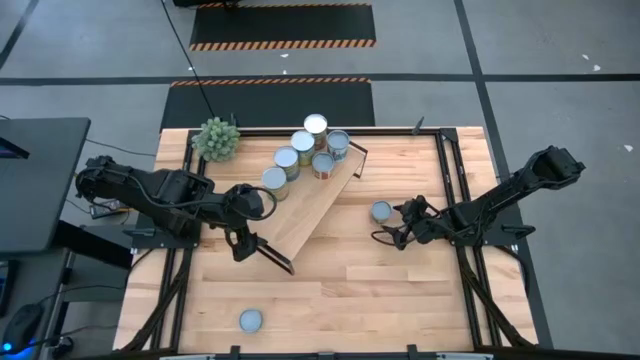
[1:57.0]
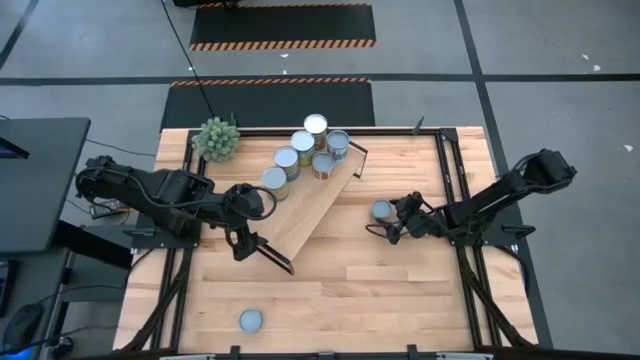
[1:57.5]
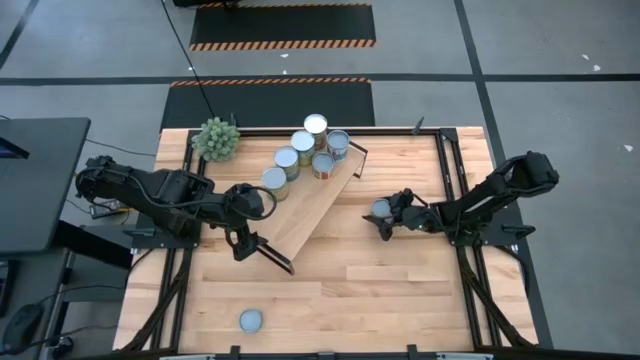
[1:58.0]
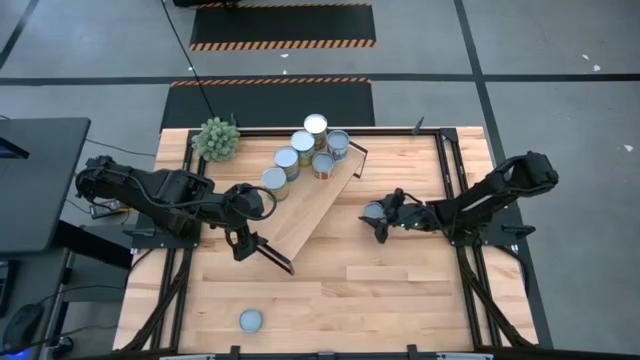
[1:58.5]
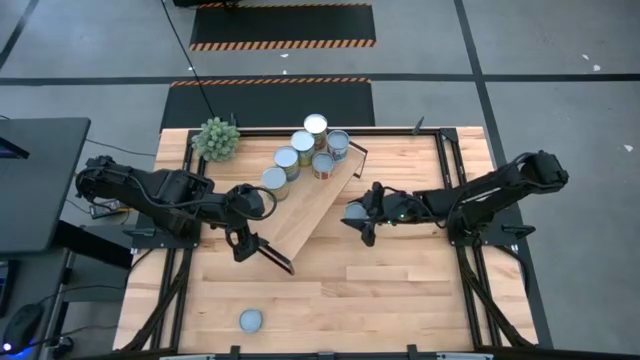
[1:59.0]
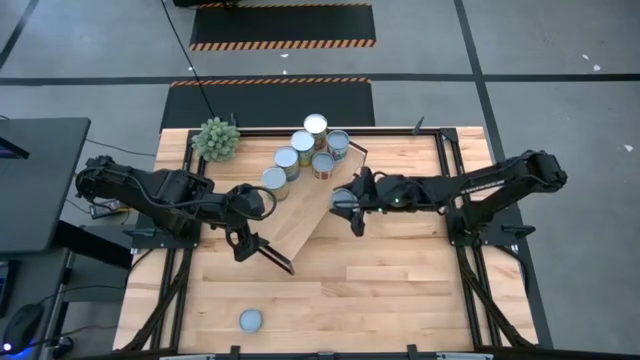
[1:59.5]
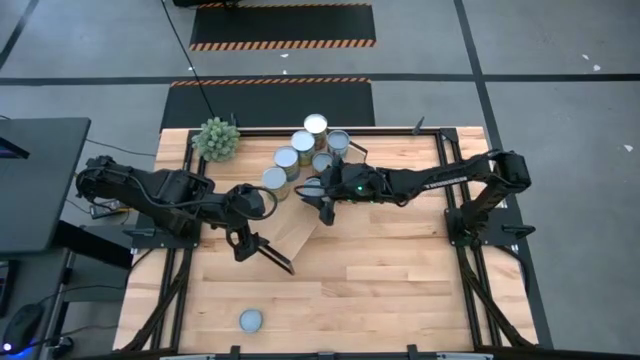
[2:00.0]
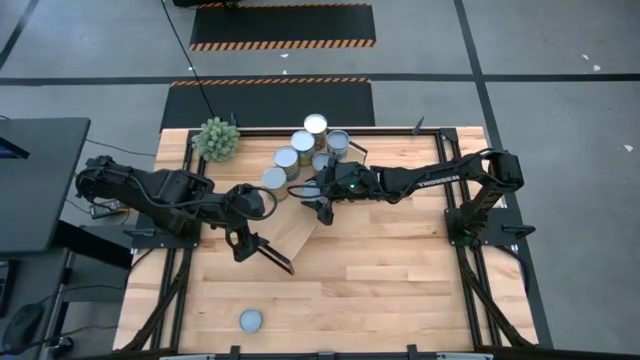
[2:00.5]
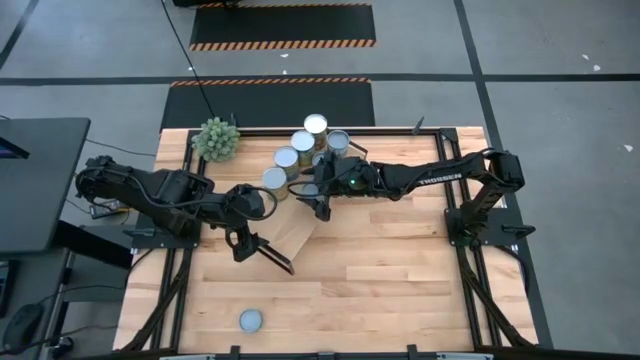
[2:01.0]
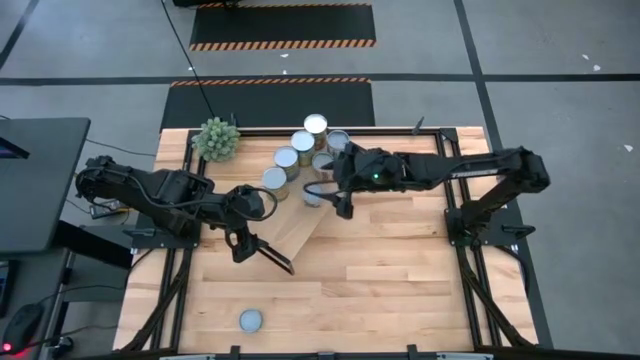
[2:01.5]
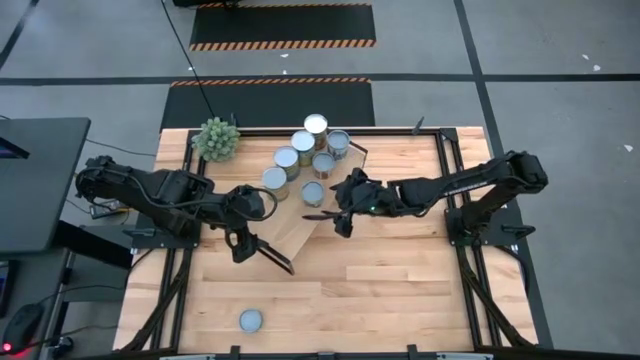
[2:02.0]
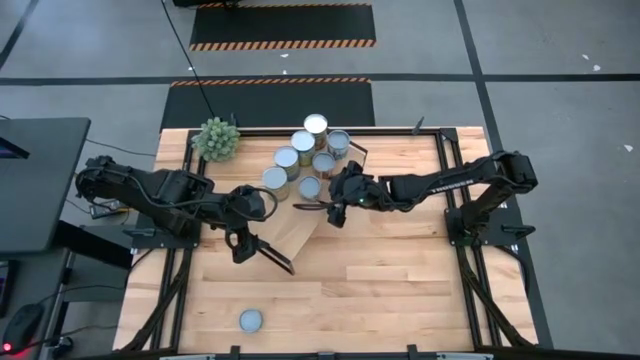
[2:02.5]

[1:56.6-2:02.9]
Task: Pick and place cans onto a shelf
Put the canned green peas on the shelf

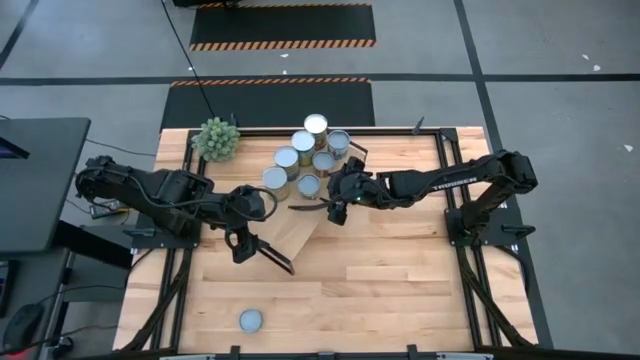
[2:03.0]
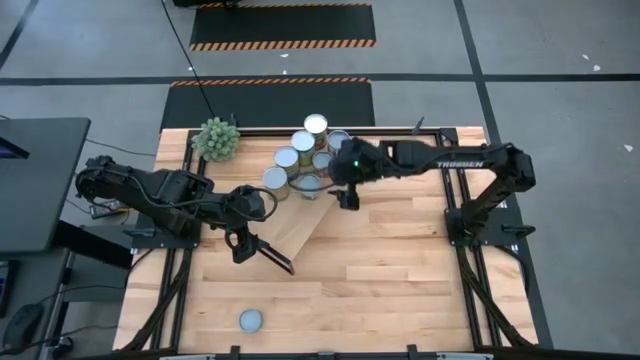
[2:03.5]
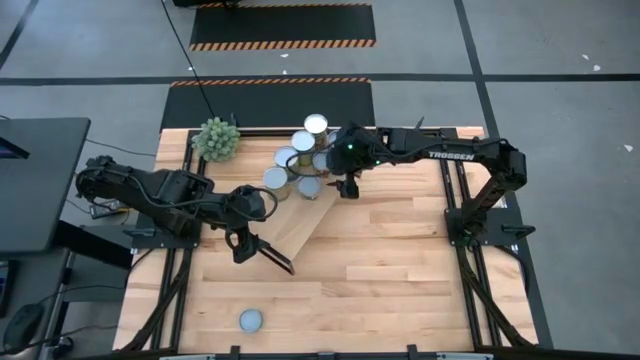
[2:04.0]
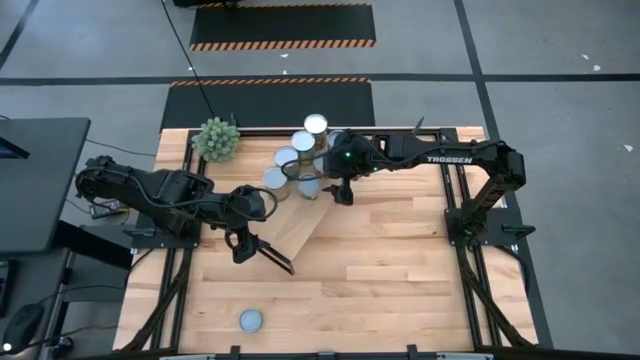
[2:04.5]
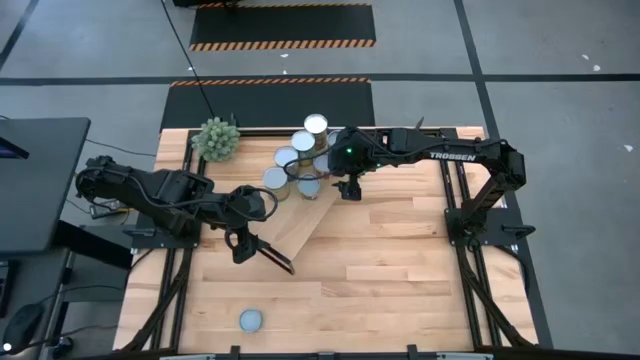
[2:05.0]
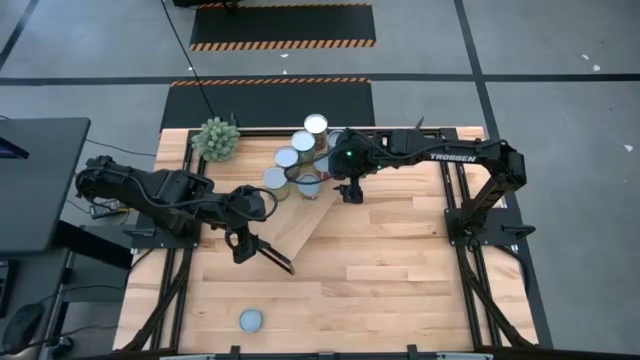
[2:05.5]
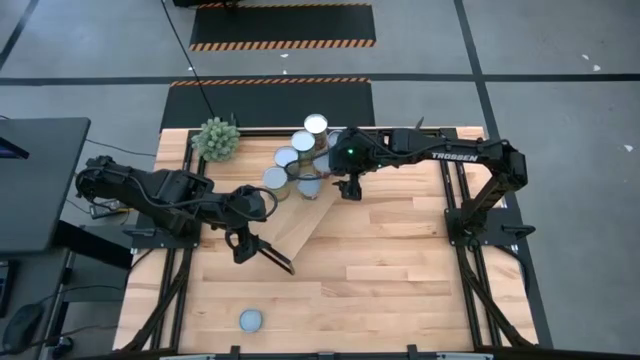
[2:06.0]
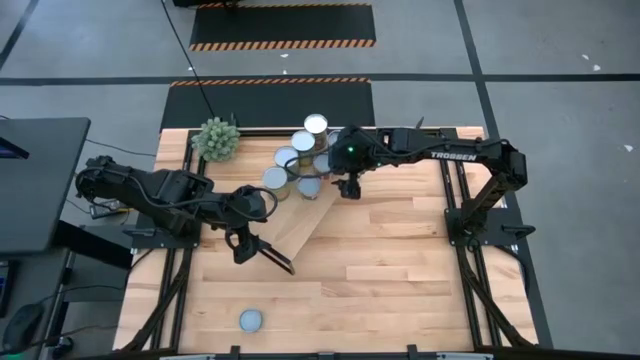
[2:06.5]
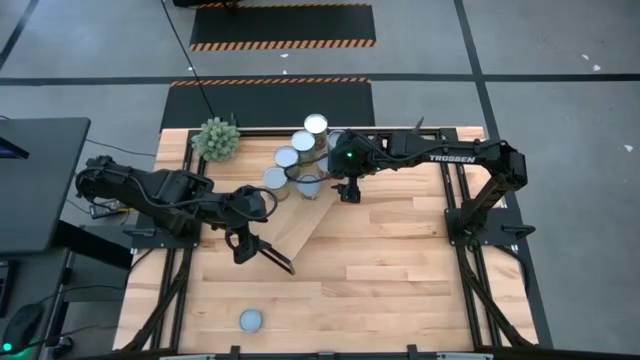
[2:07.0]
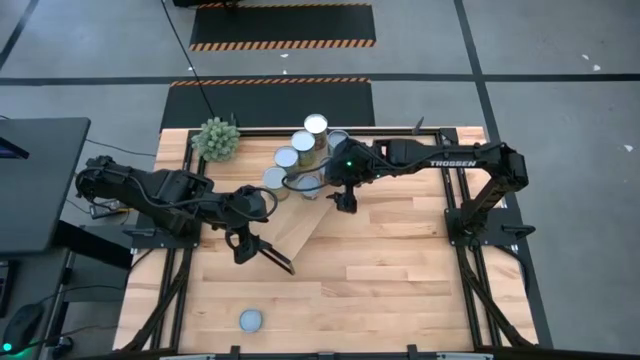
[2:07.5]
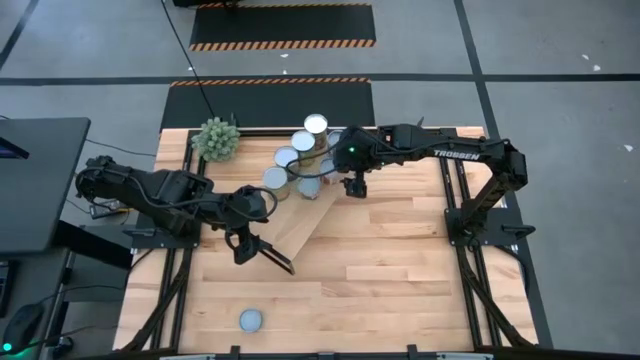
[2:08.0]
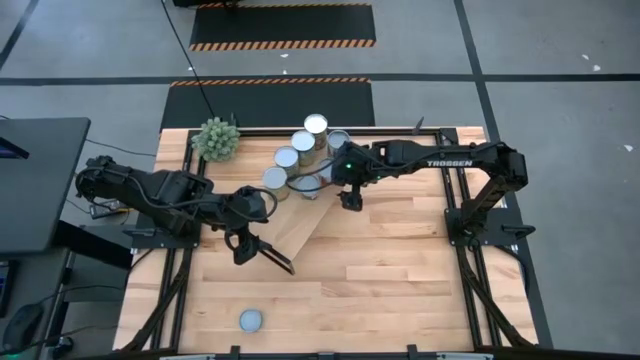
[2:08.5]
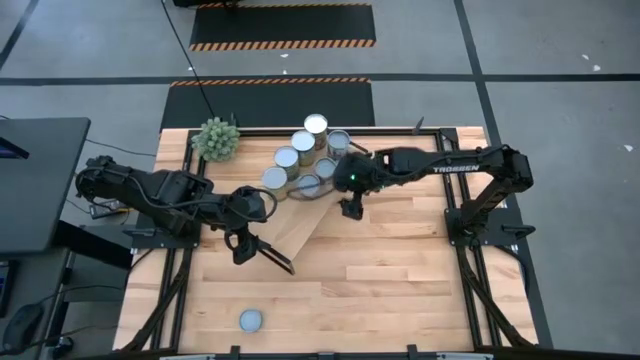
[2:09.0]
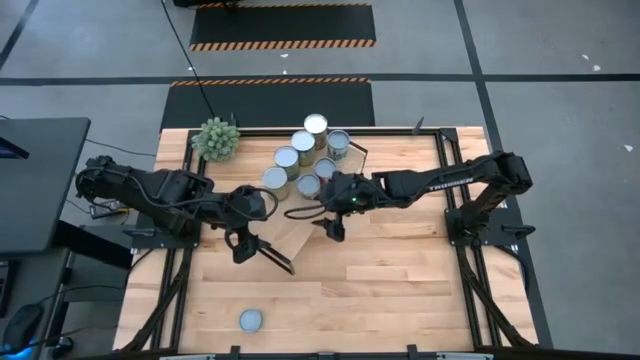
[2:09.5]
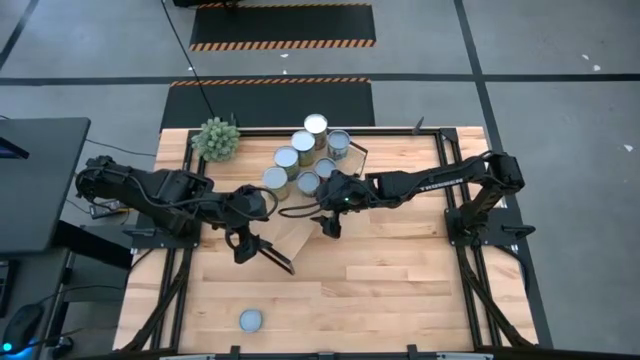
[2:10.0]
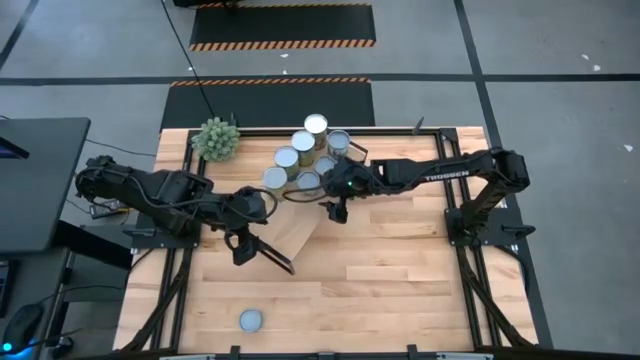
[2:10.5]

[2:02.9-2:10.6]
Adjust the cans on the shelf

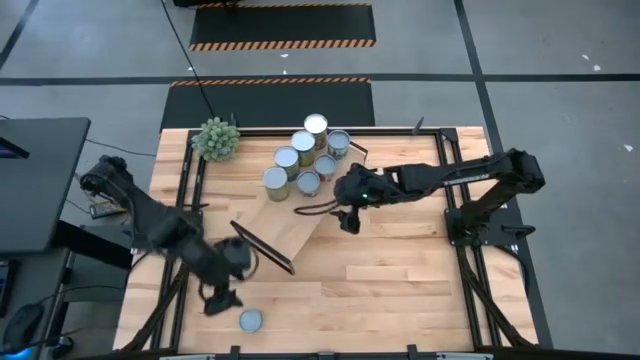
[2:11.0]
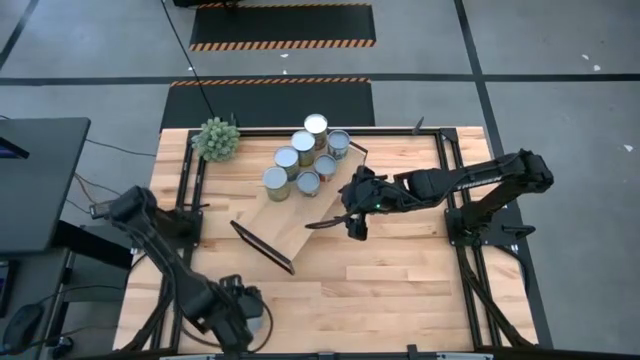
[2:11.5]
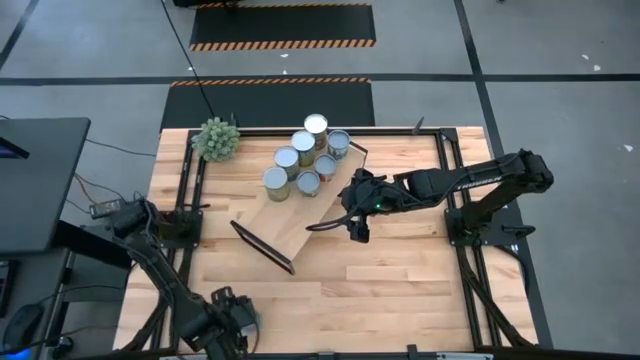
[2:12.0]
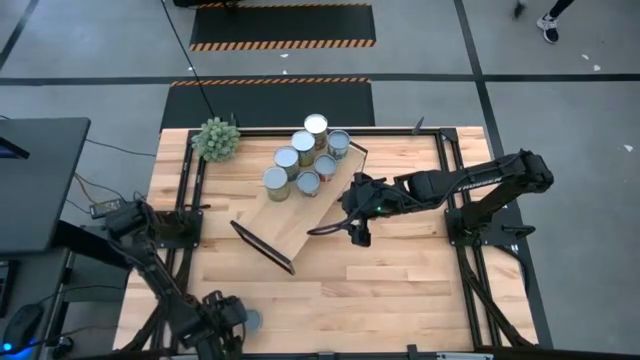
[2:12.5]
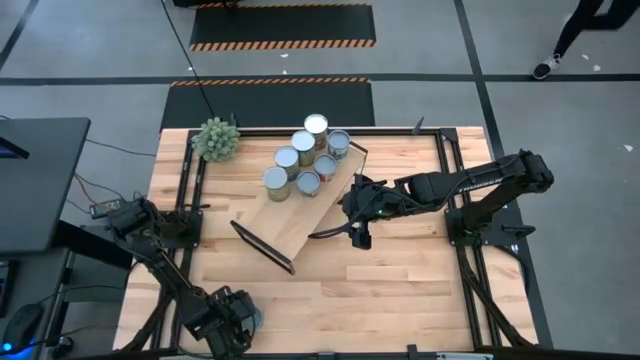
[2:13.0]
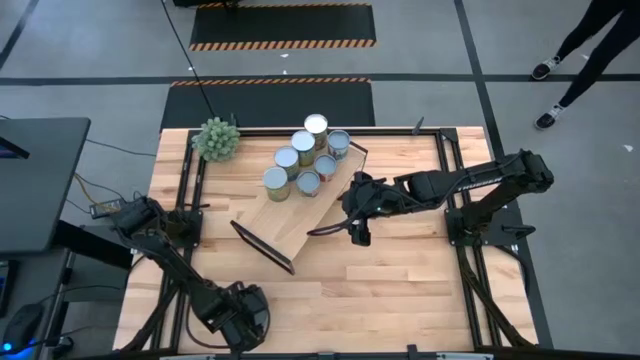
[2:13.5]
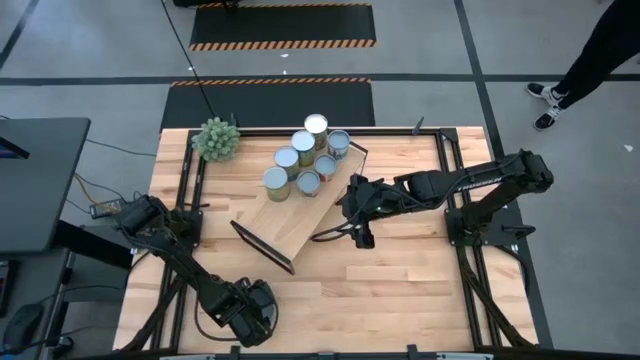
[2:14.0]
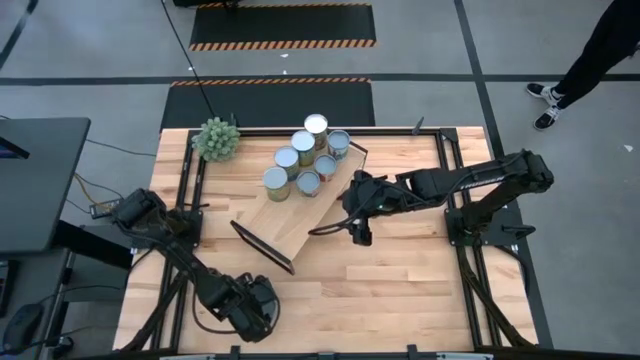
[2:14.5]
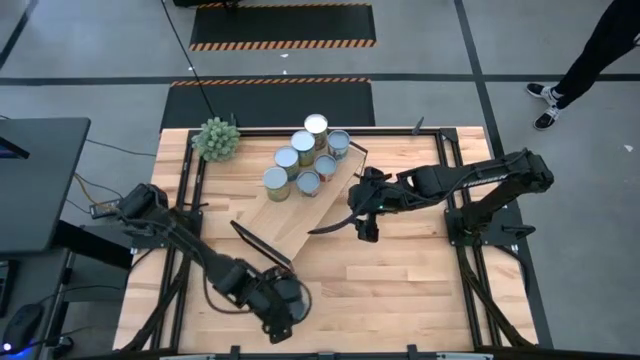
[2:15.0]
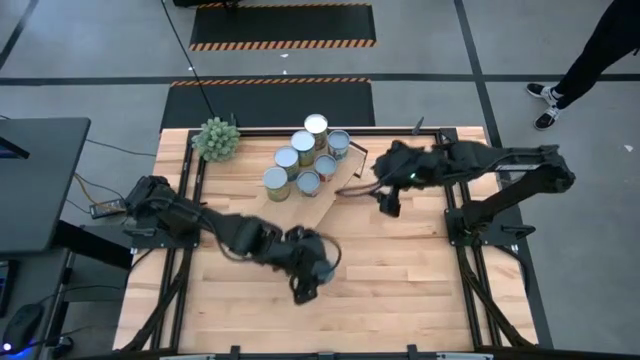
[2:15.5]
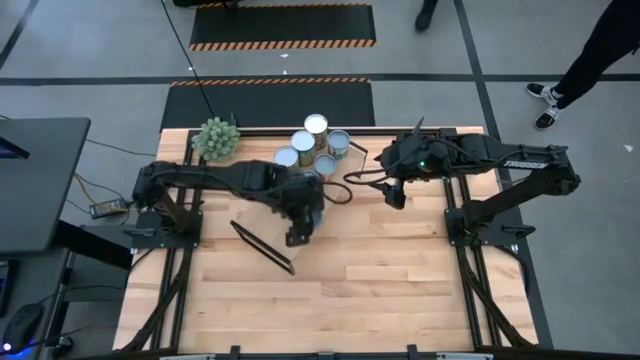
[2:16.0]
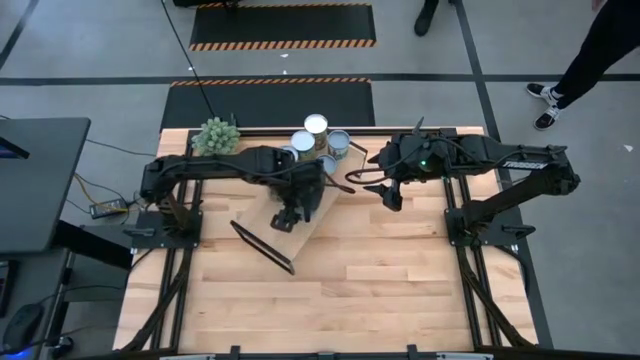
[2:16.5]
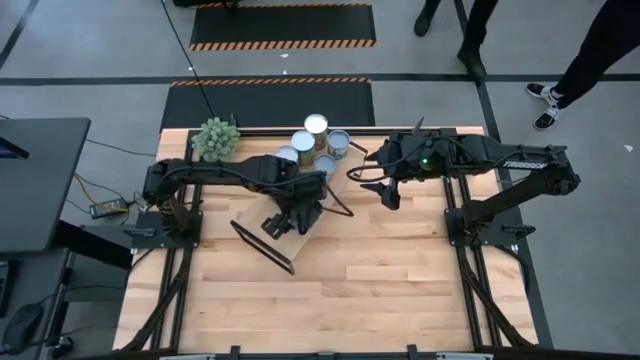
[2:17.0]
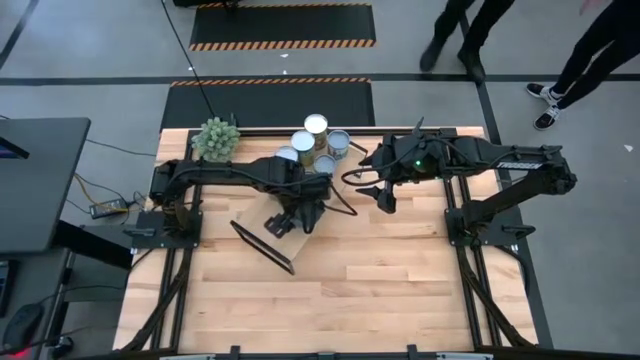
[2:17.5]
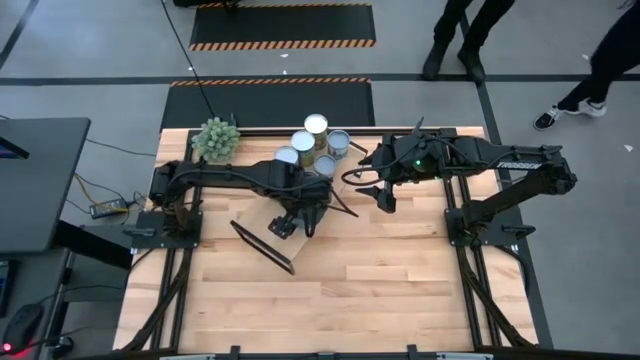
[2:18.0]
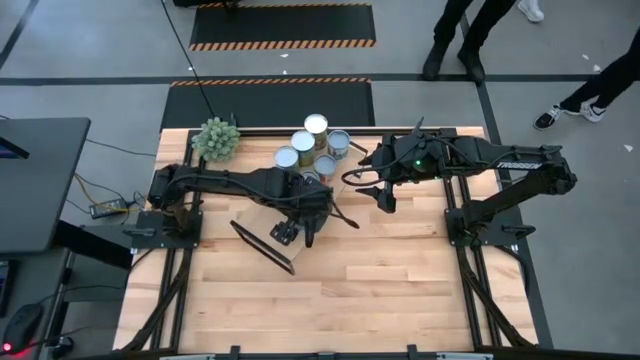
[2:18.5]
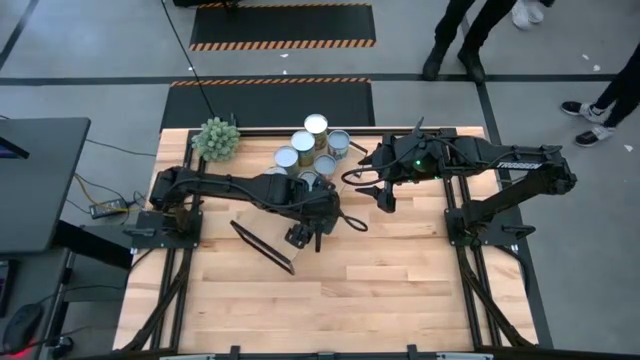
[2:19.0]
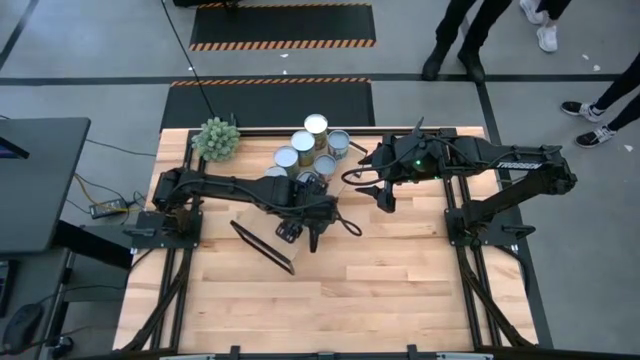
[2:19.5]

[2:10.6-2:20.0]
Put the canned tuna on the shelf
